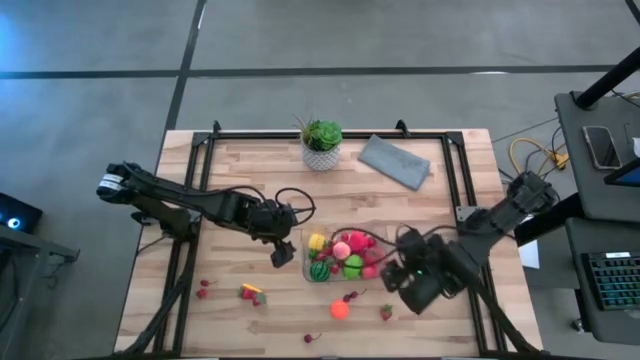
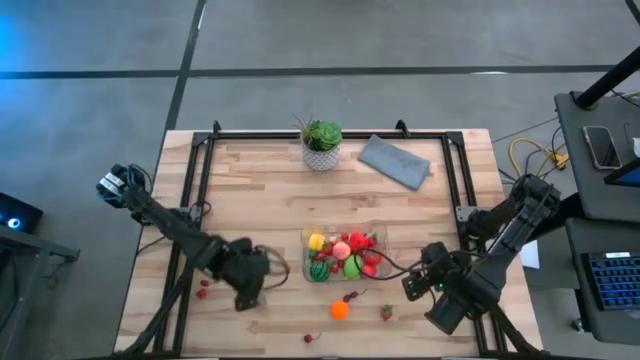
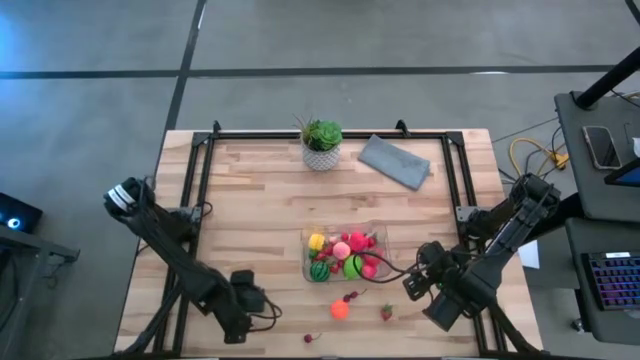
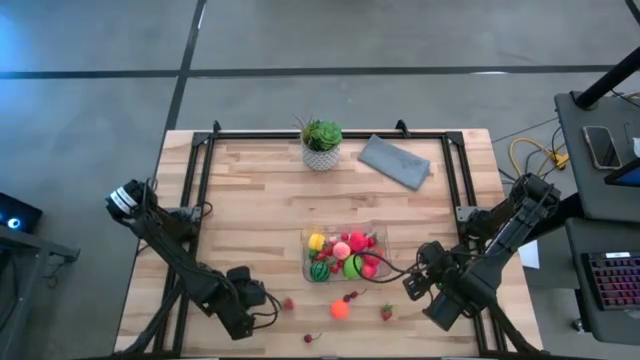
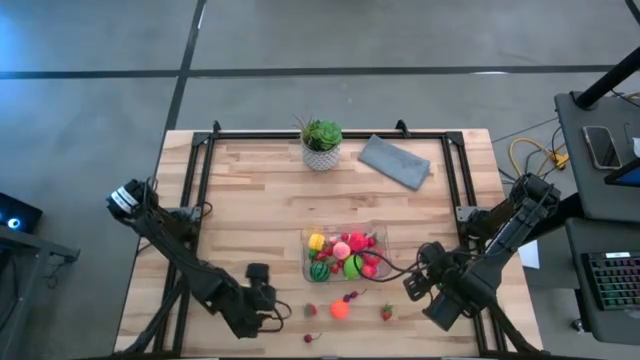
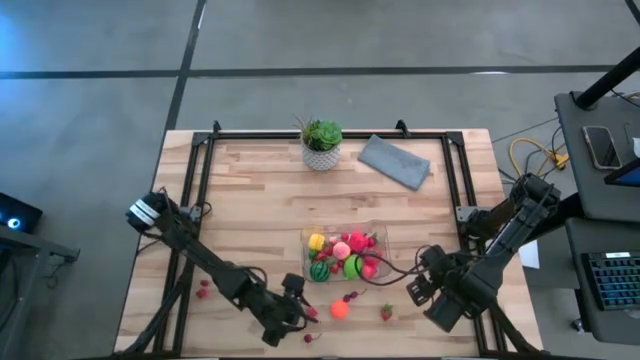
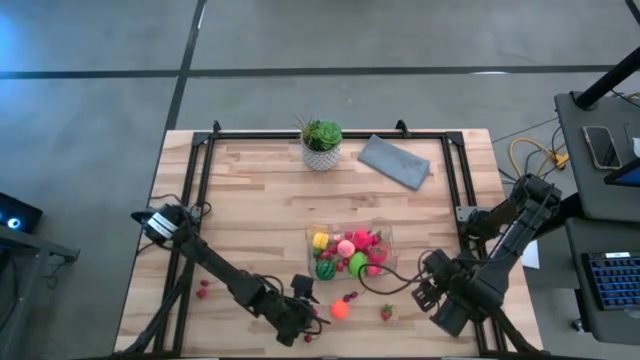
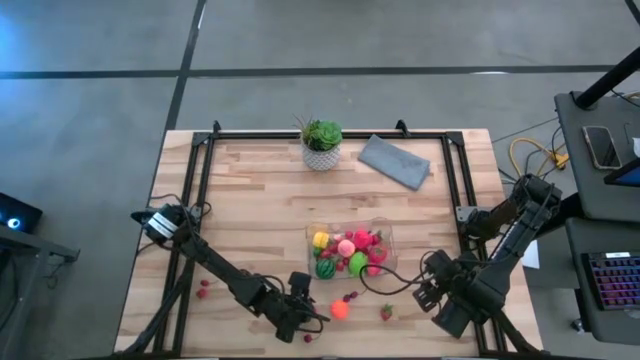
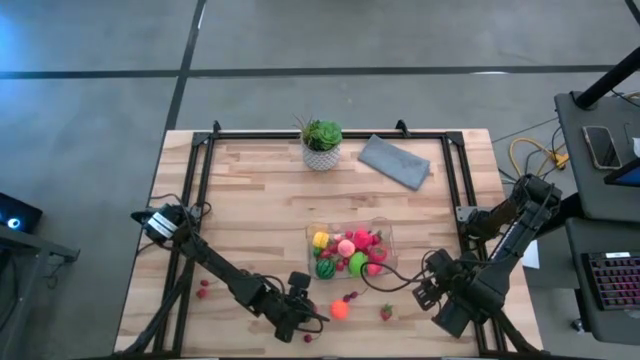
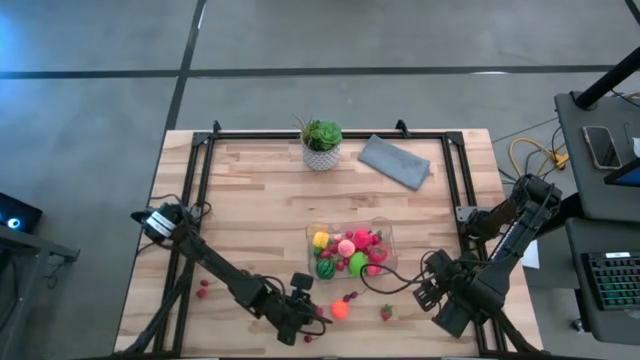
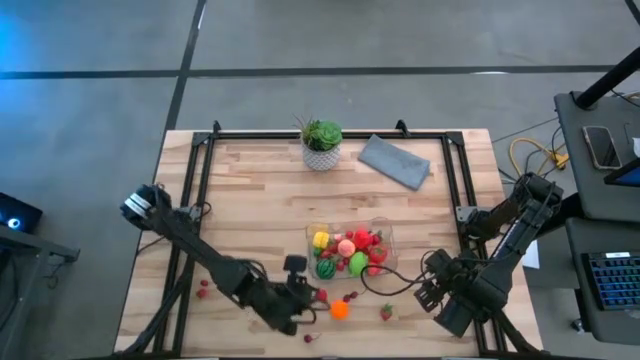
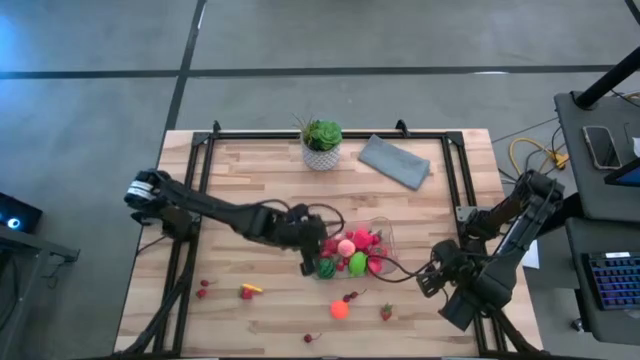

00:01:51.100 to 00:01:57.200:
Task: Pick and placing Produce into tupperware
Put the strawberry into the transparent bin

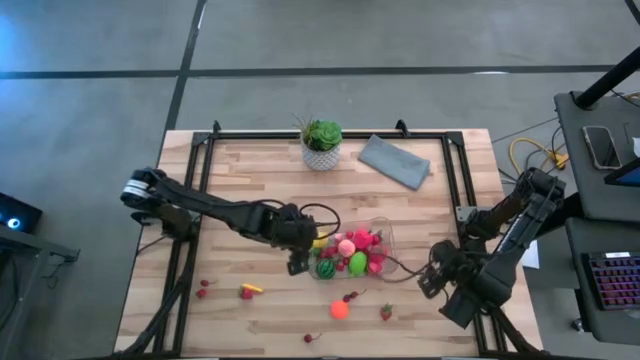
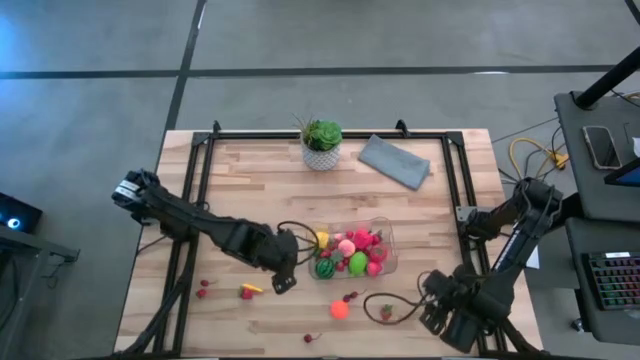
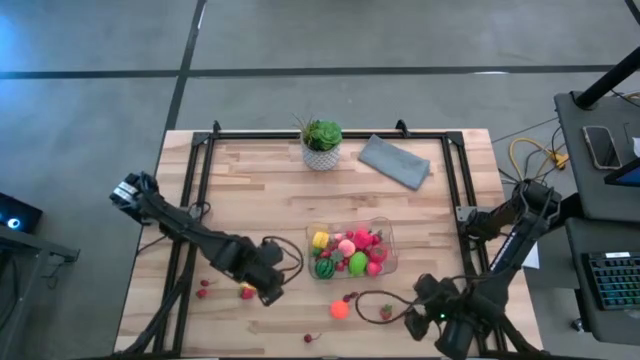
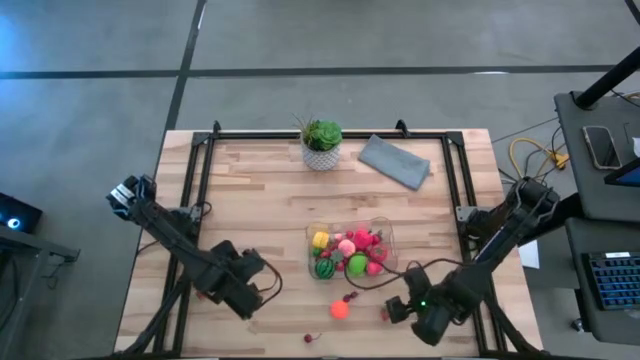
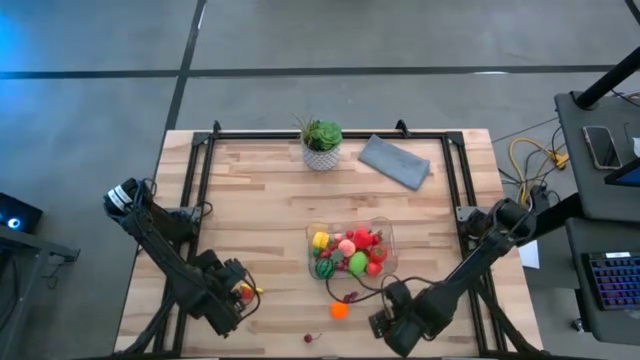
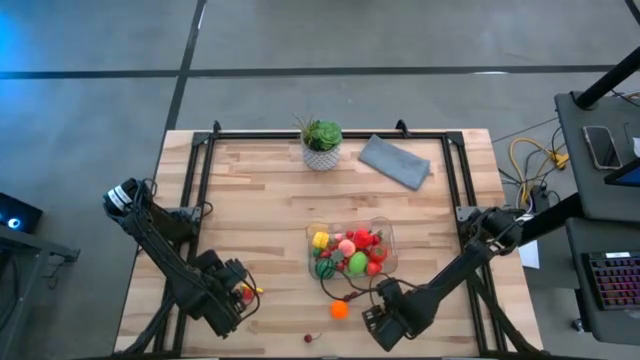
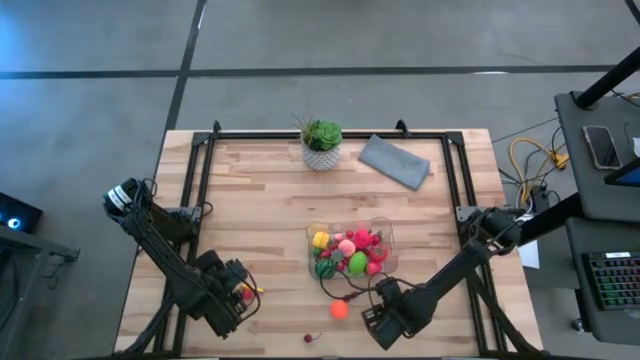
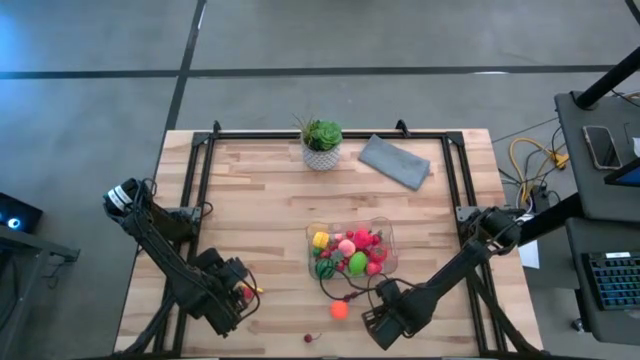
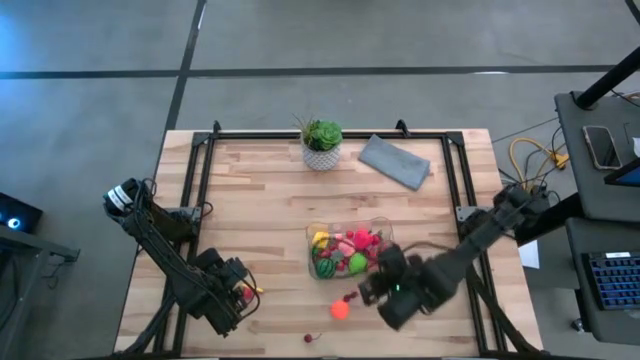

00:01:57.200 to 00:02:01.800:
Put the strawberry into the transparent bin

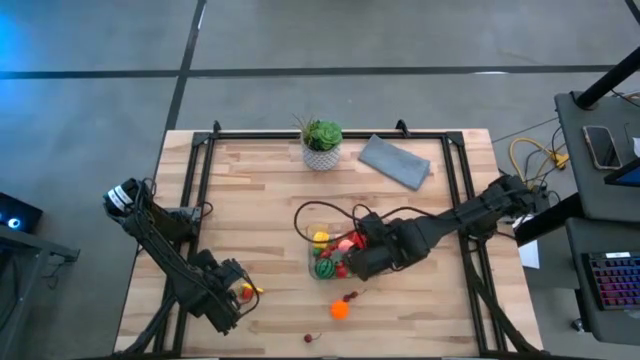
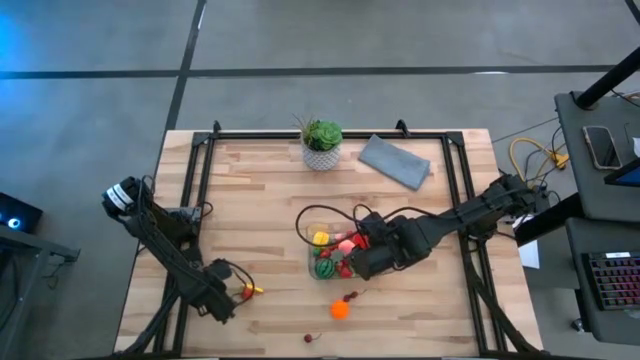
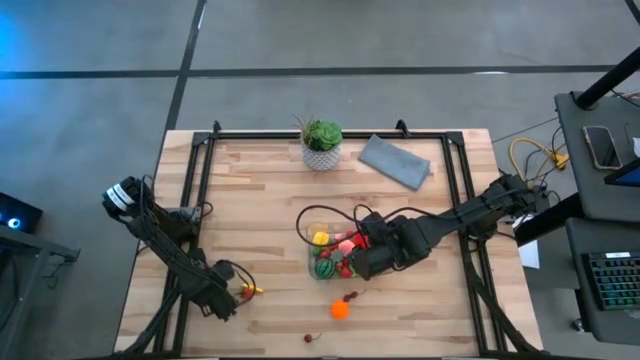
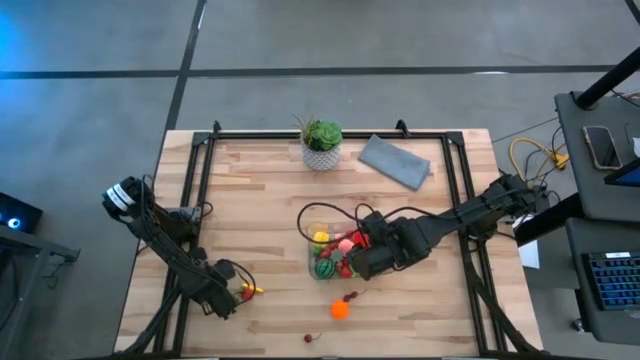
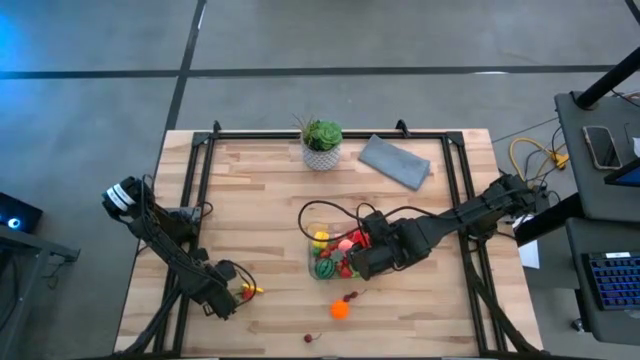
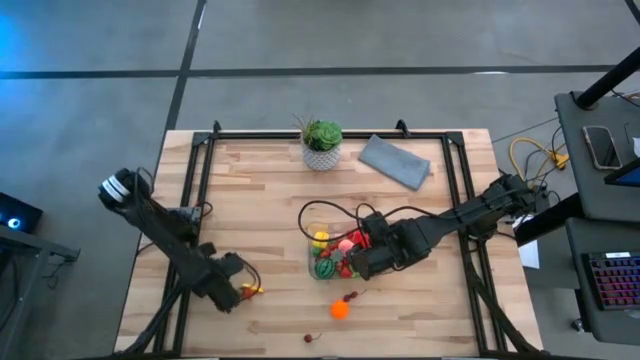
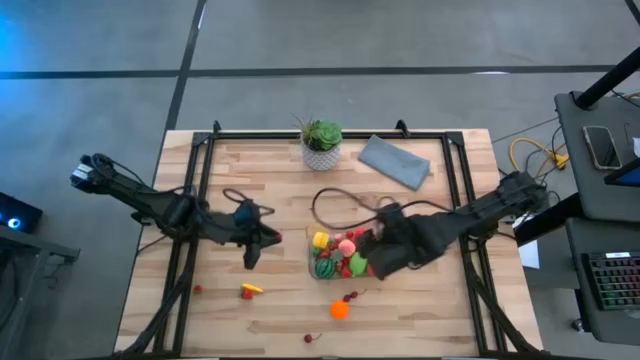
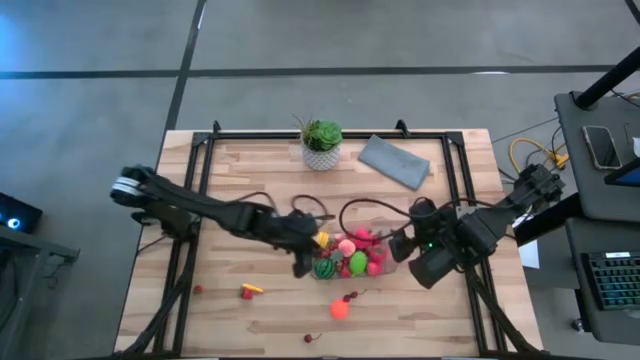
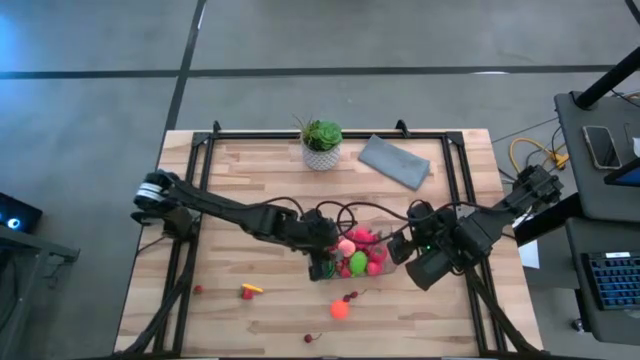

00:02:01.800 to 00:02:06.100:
Put the cherry into the transparent bin

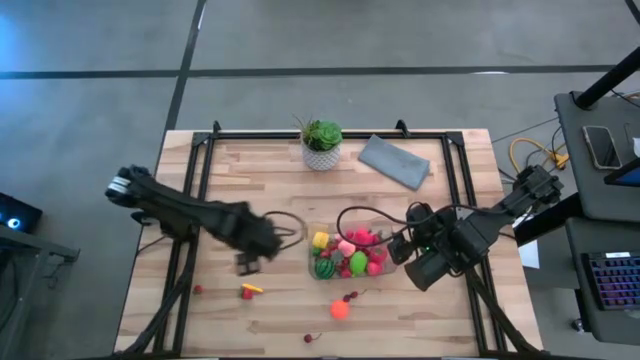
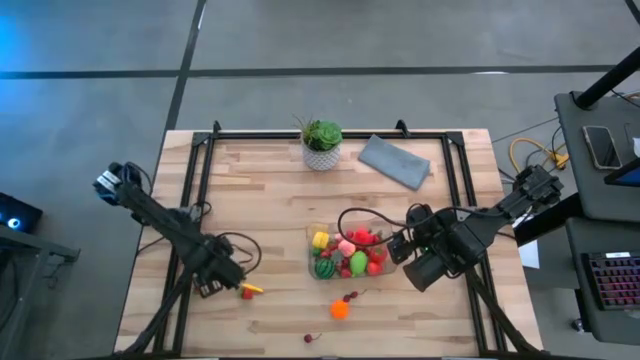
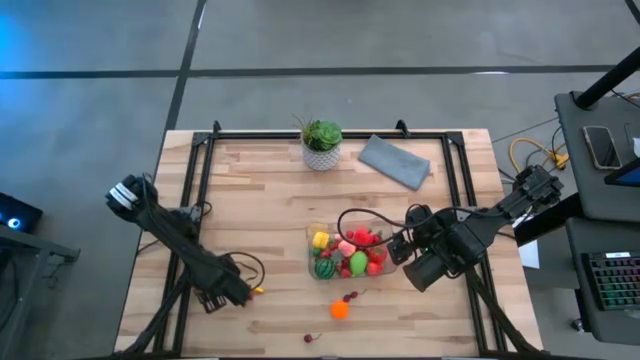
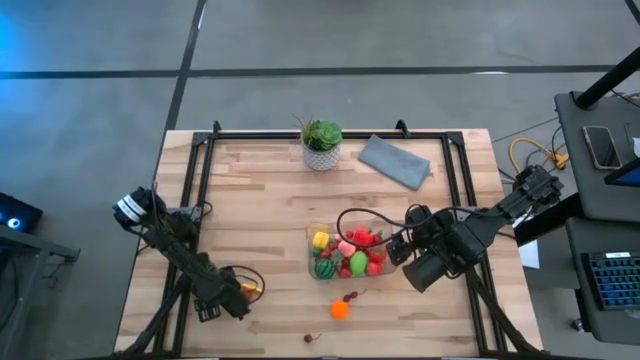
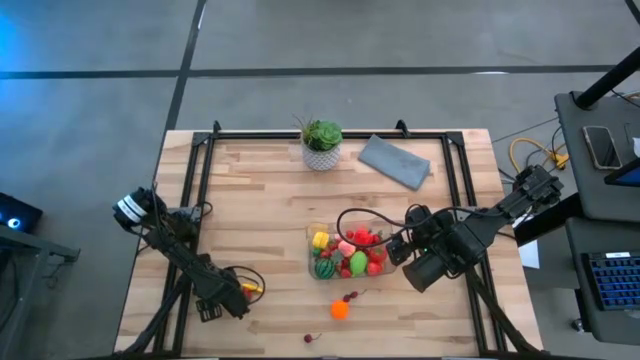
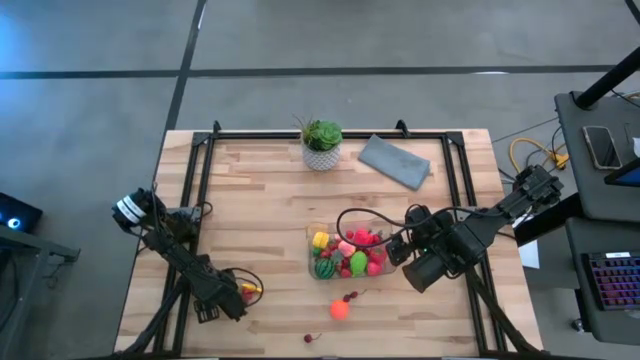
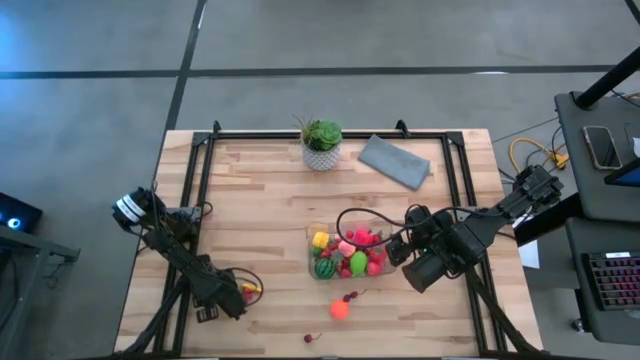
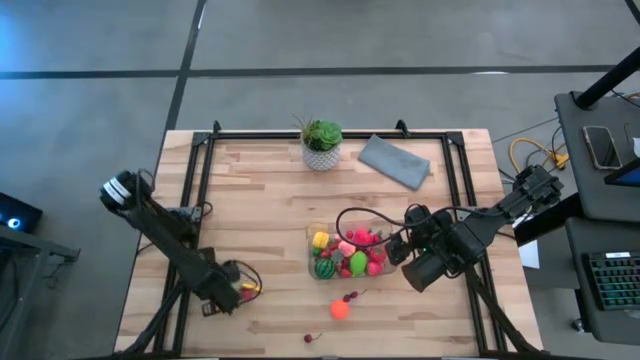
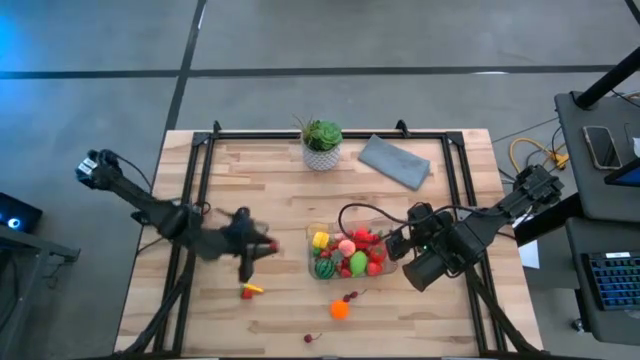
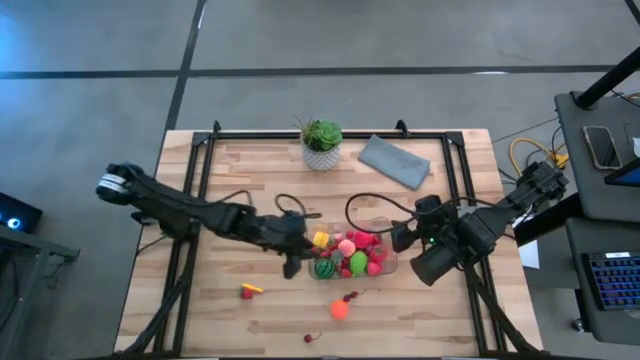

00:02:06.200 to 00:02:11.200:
Put the strawberry into the transparent bin

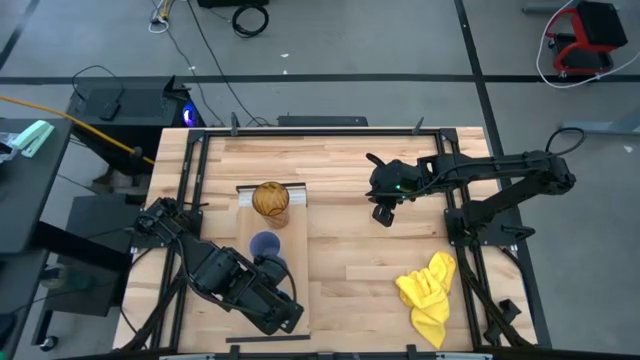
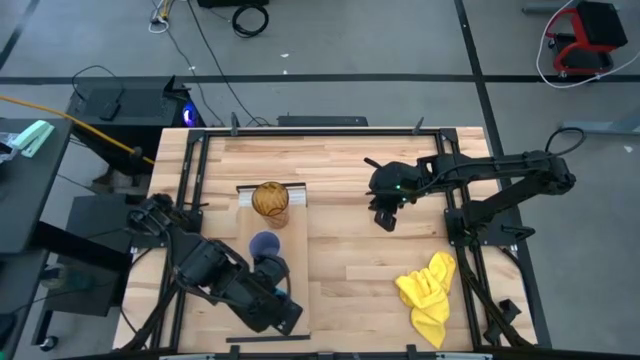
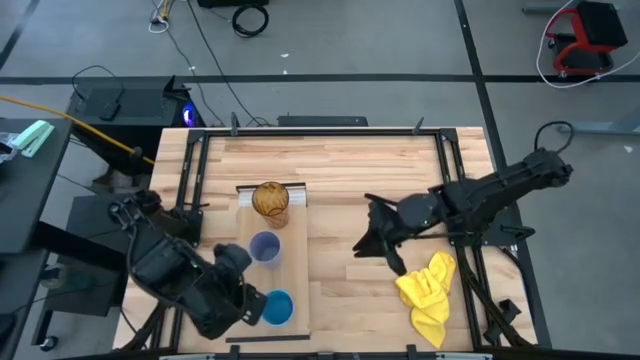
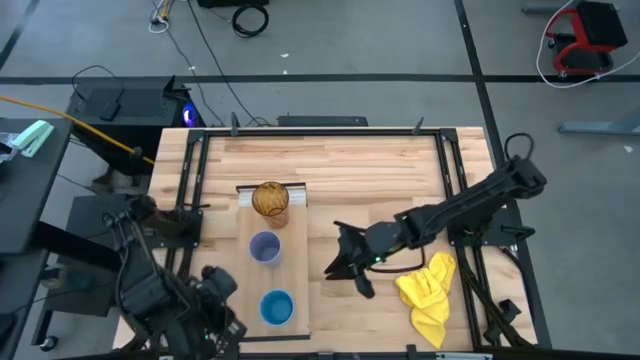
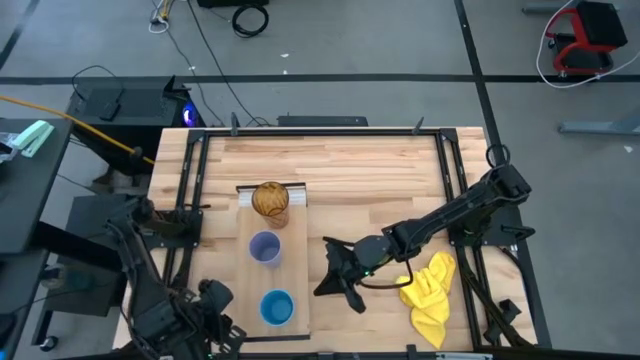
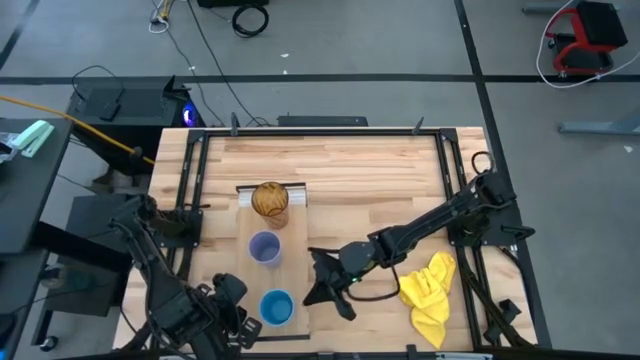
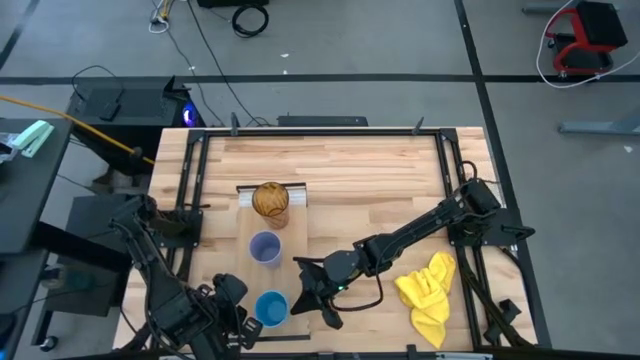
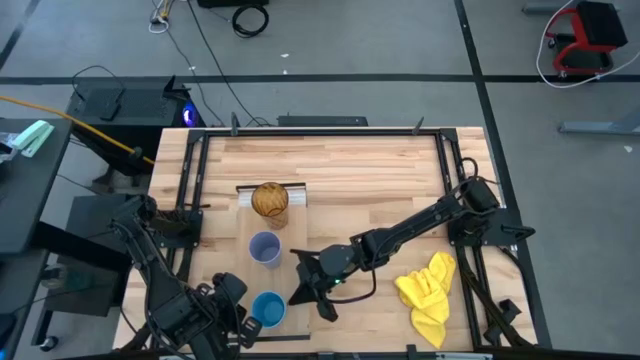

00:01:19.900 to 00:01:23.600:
Task: Stack small to large cups/mugs on shelf
Adjust the light blue cup
